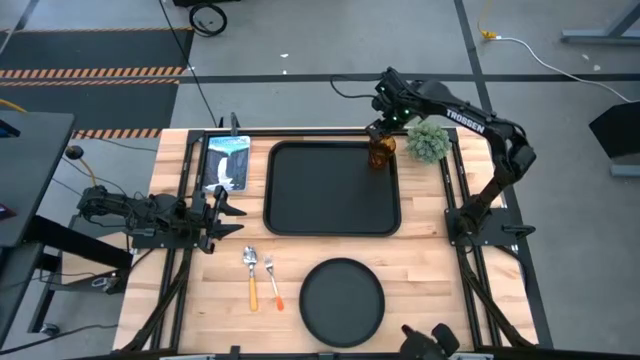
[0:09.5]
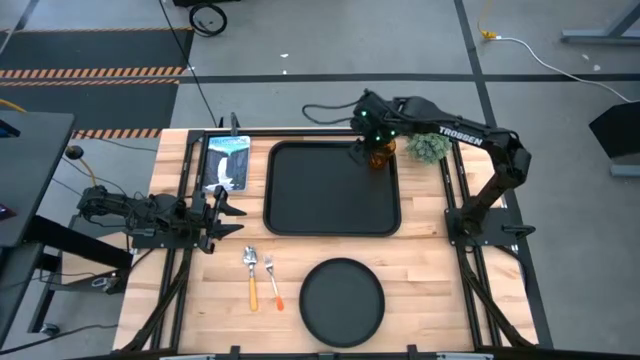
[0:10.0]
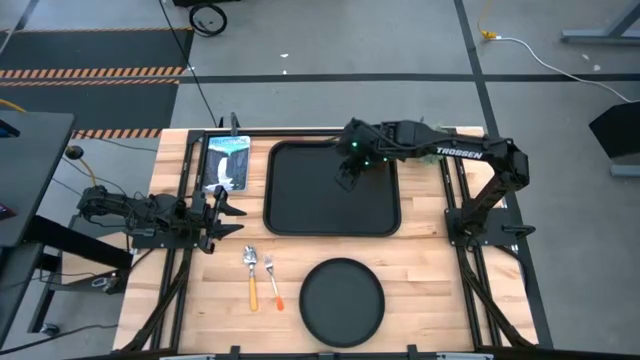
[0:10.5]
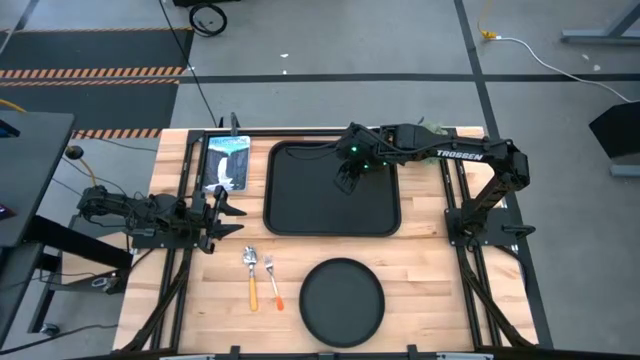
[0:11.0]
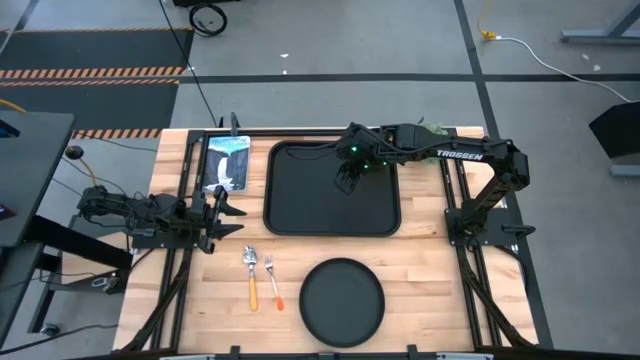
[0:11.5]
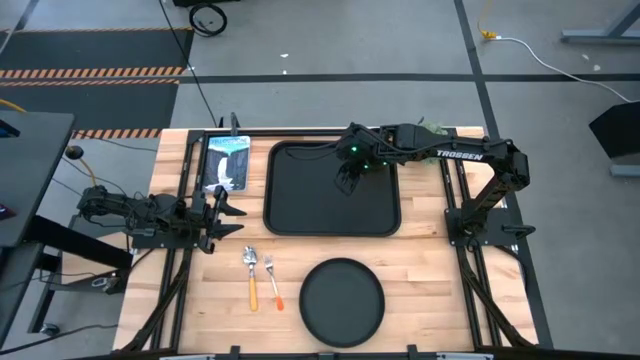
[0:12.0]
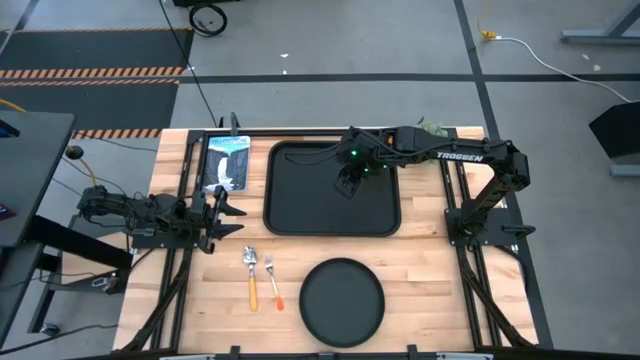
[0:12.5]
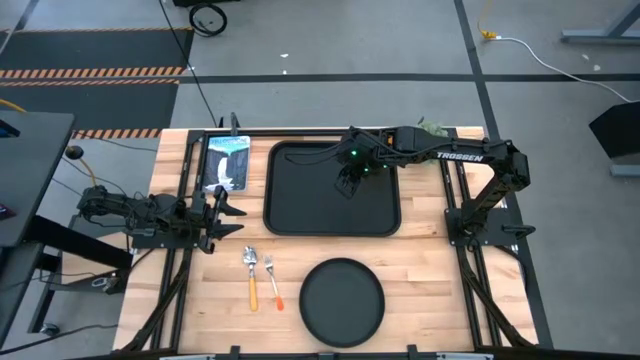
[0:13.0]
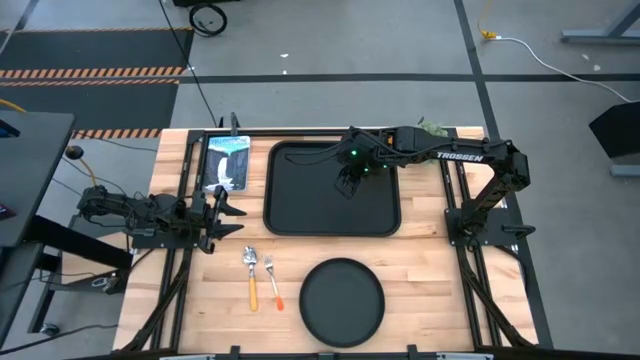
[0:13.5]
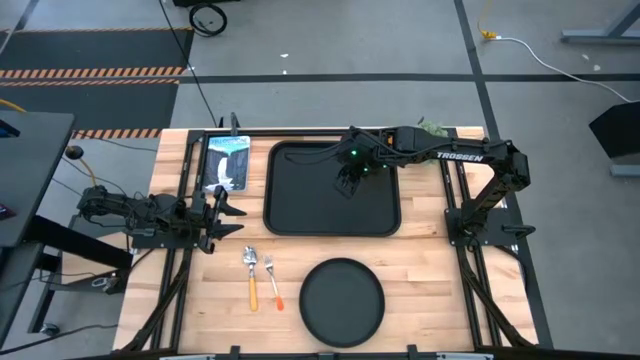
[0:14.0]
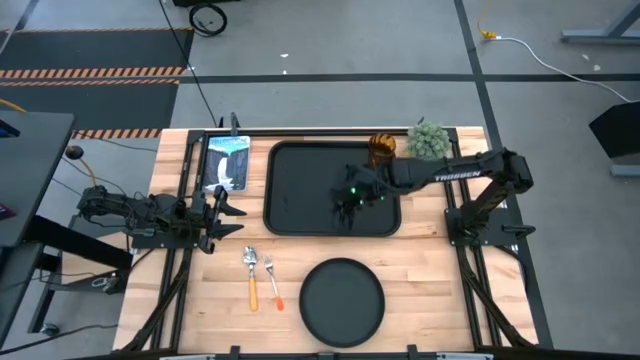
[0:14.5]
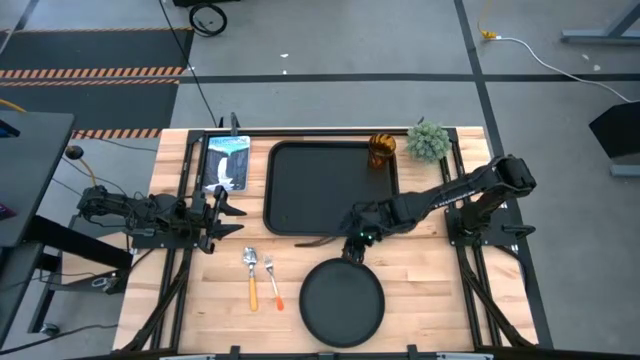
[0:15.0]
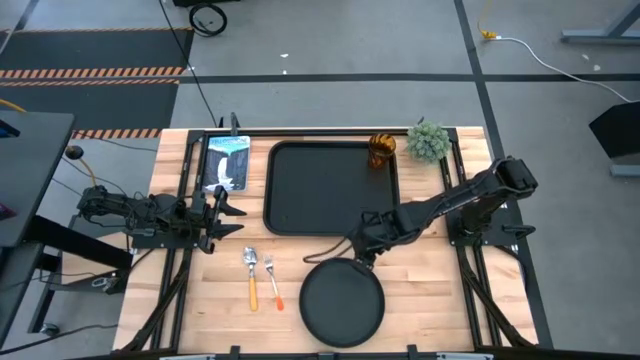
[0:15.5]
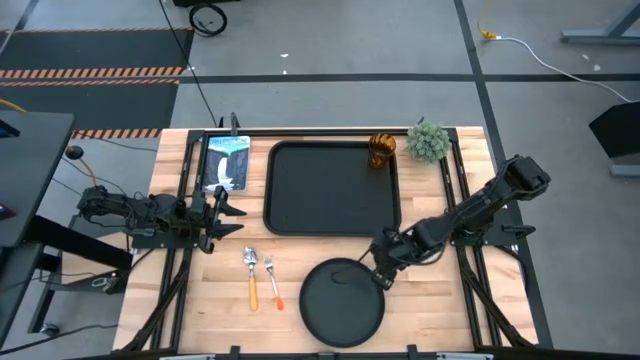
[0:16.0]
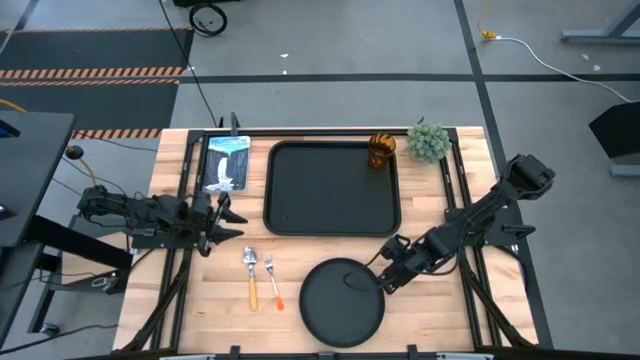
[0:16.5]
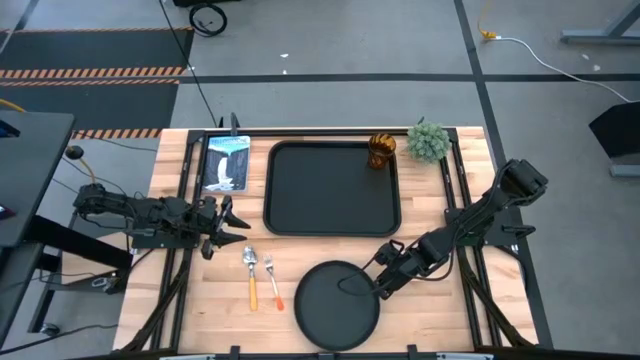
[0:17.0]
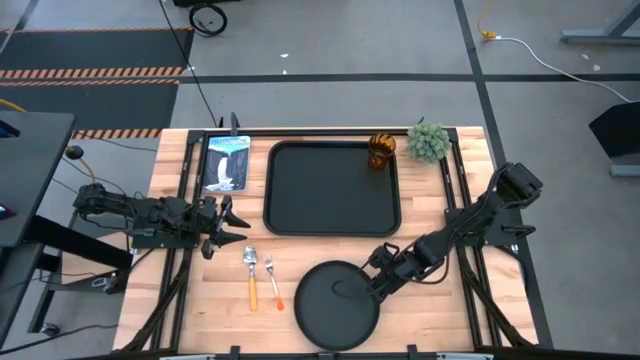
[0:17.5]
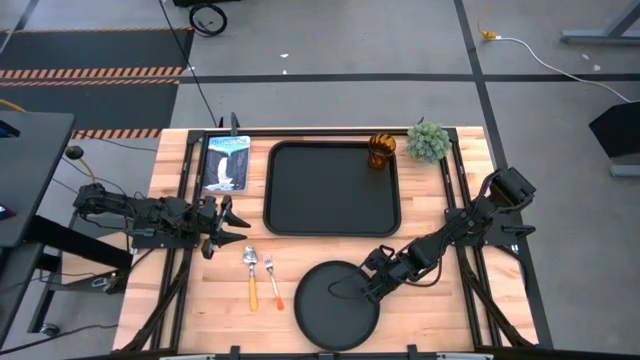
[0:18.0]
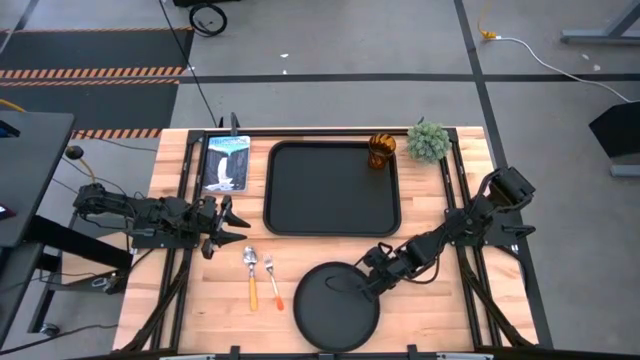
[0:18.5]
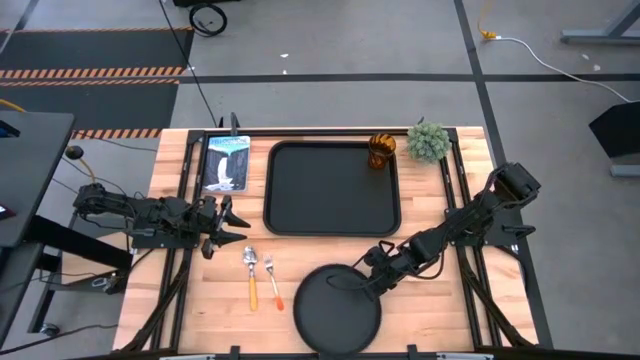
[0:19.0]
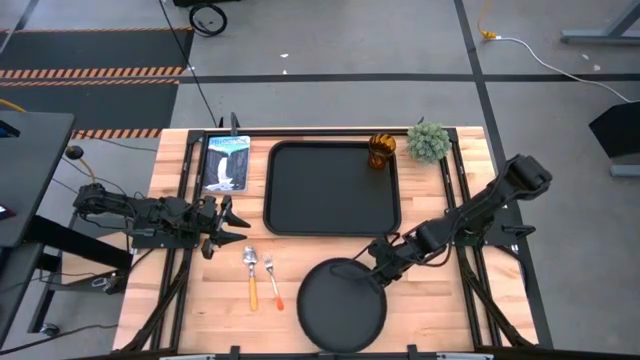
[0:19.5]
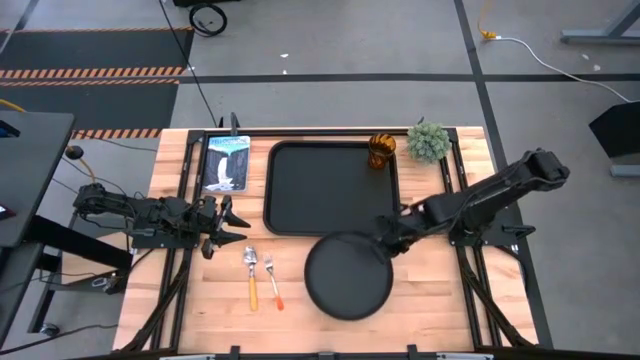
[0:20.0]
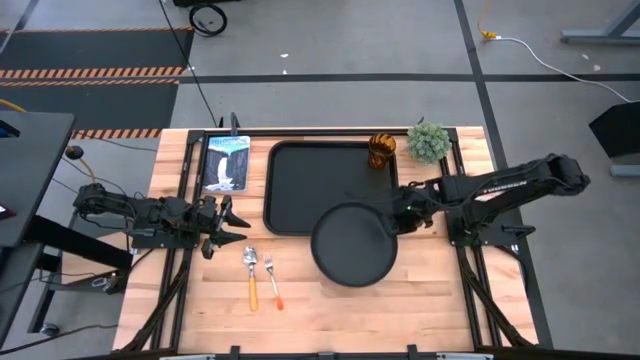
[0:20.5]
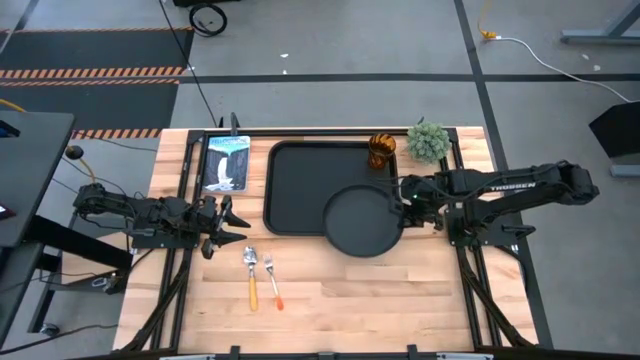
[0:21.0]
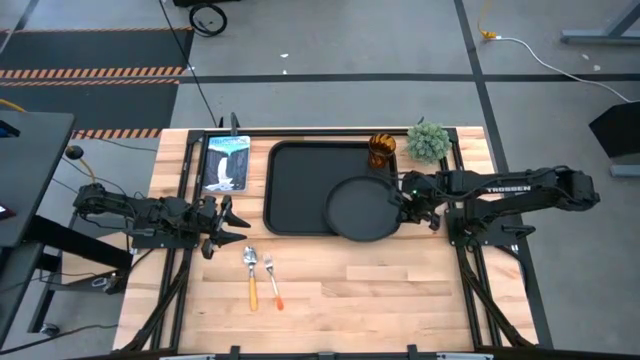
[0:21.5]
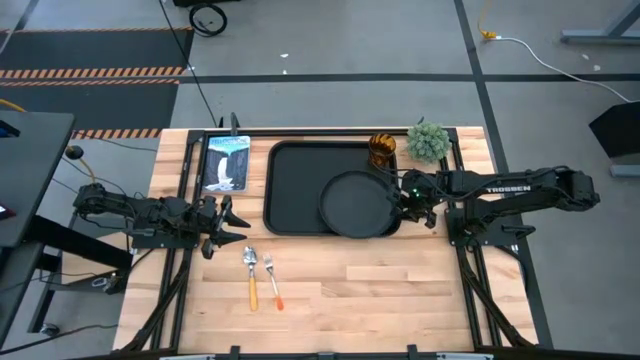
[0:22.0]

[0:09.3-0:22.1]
Task: Pick and place plate/cup/fork/spoon on tray
Put the black plate on the black serving tray to the bottom left of the brown cup

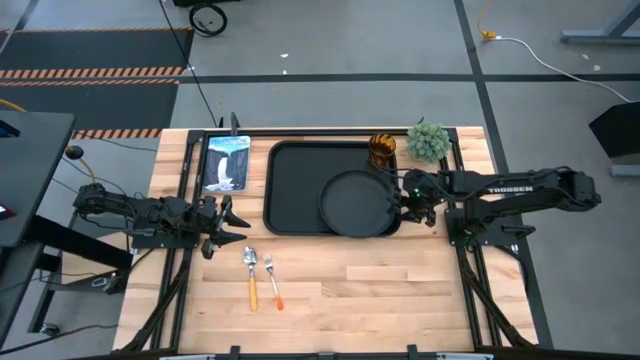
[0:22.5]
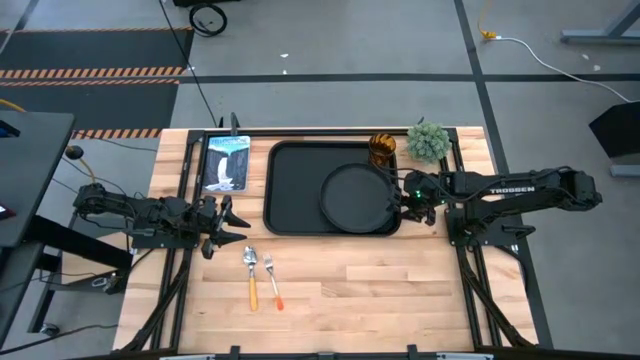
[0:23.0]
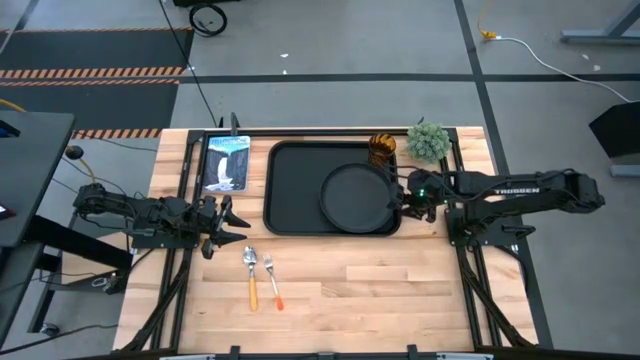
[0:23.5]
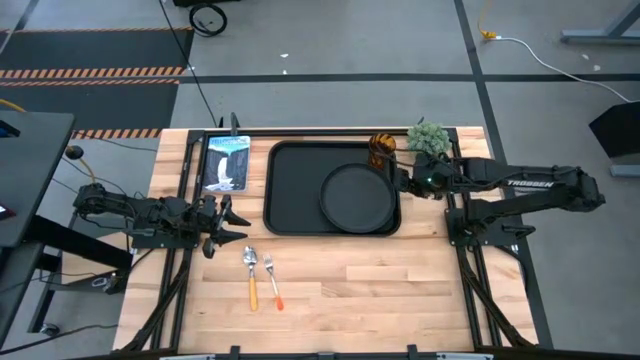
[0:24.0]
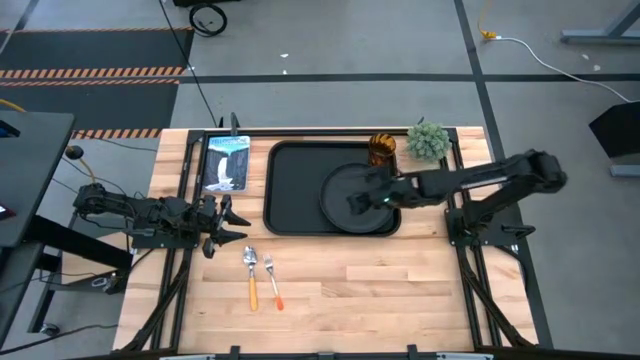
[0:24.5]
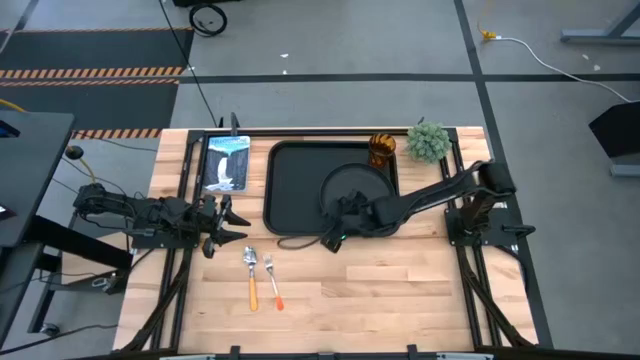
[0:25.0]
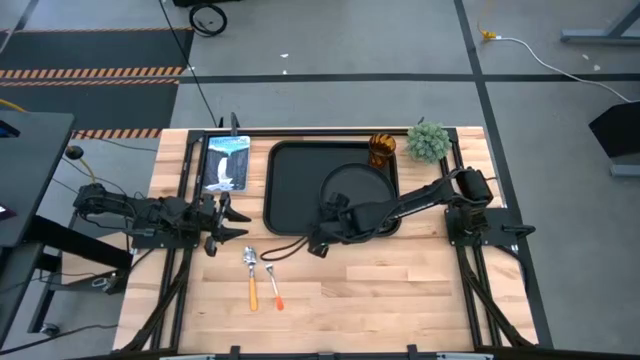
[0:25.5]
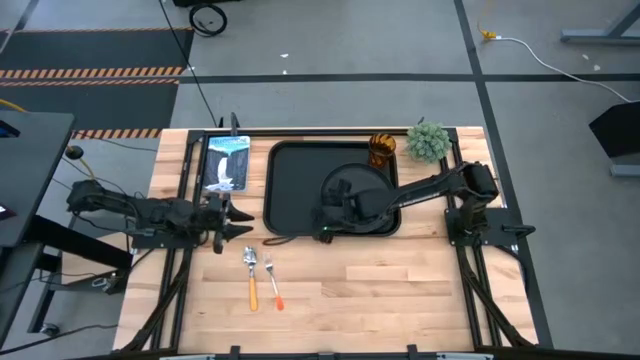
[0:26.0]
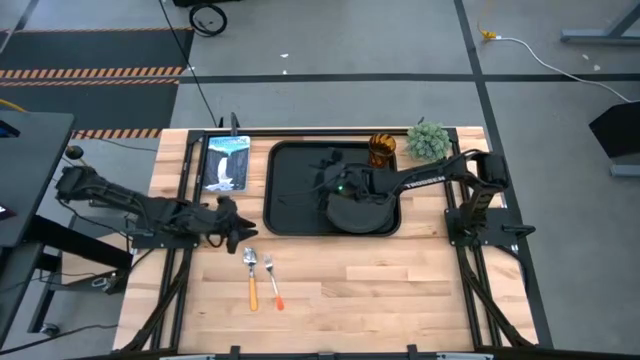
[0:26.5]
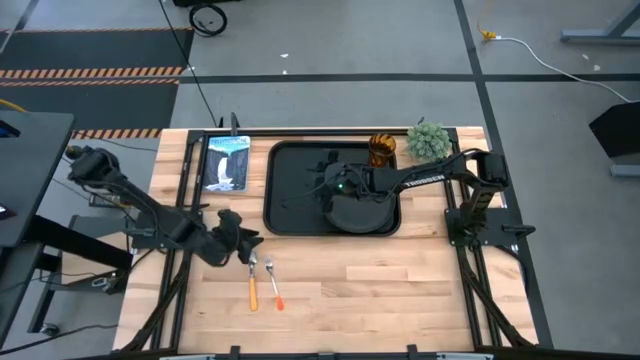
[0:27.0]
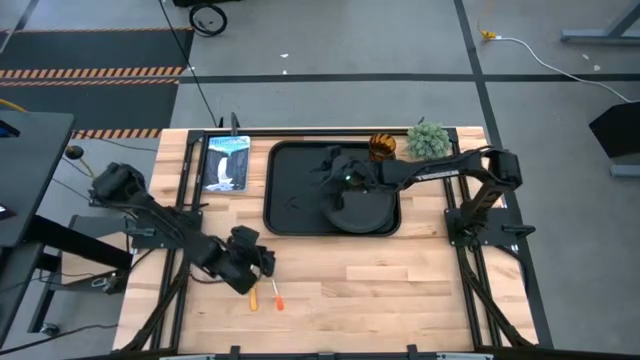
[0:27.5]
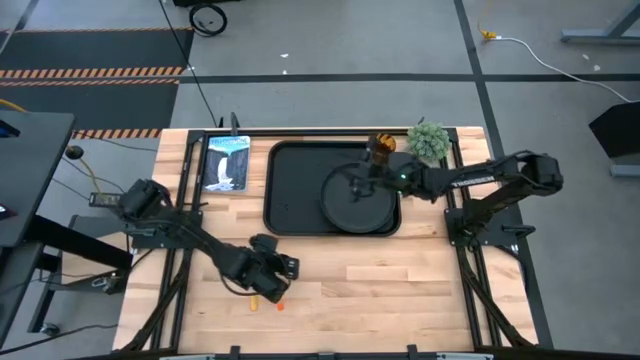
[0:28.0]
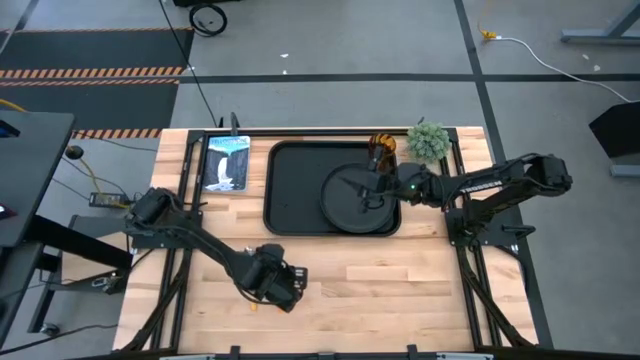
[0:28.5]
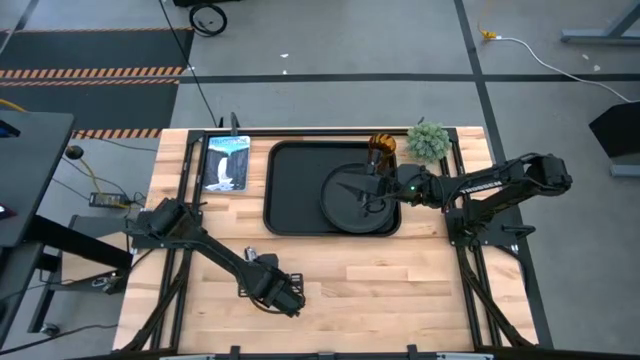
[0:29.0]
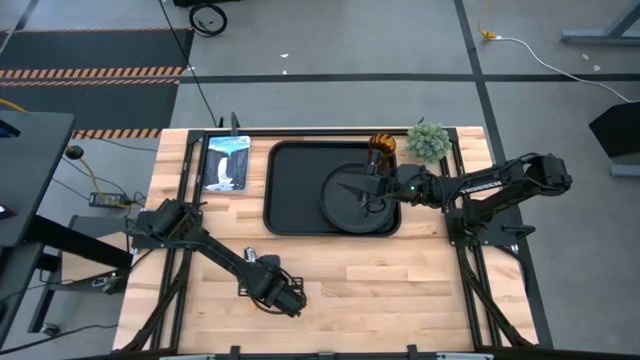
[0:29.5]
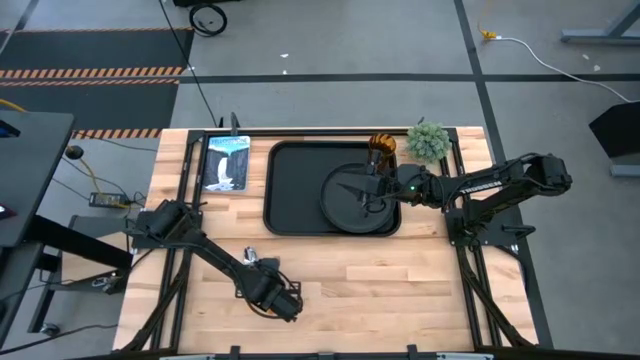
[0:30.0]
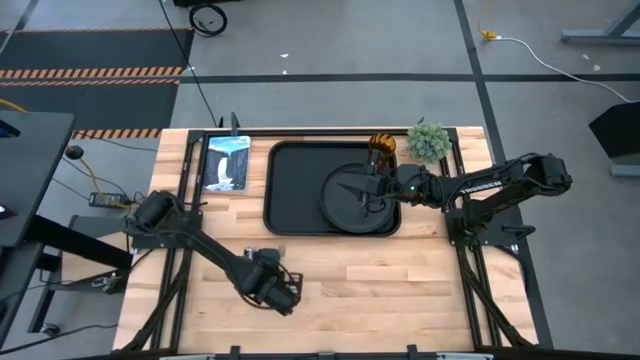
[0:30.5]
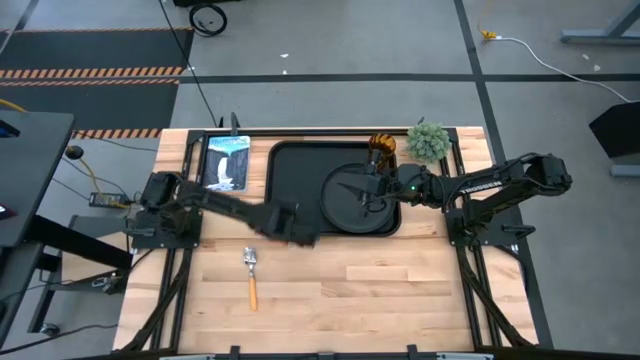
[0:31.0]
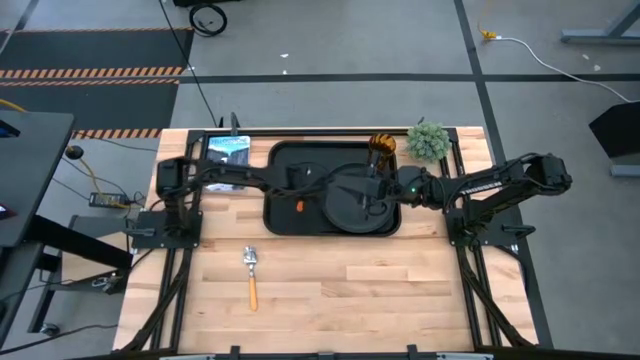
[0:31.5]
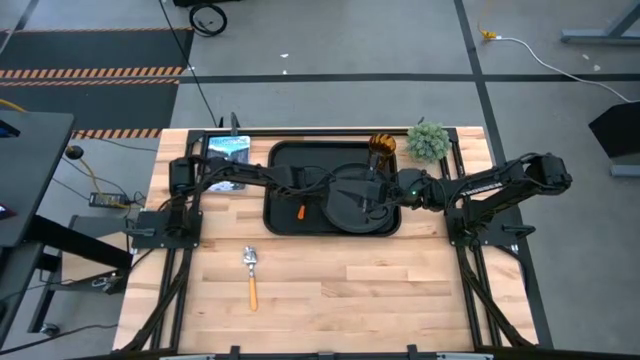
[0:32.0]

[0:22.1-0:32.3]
Put the orange fork on the black serving tray to the left of the black plate
